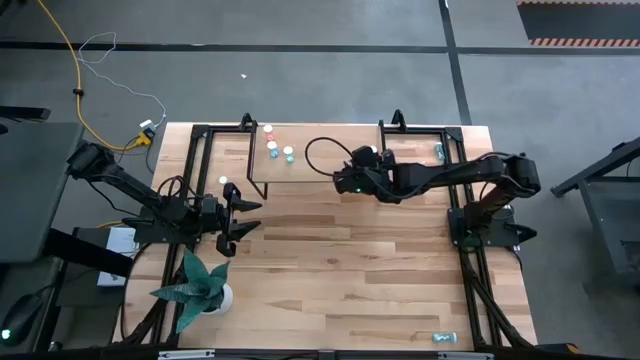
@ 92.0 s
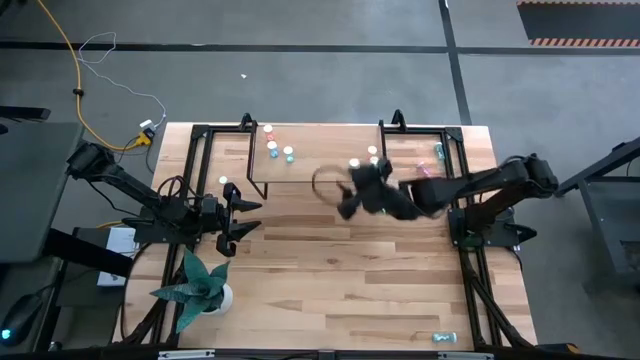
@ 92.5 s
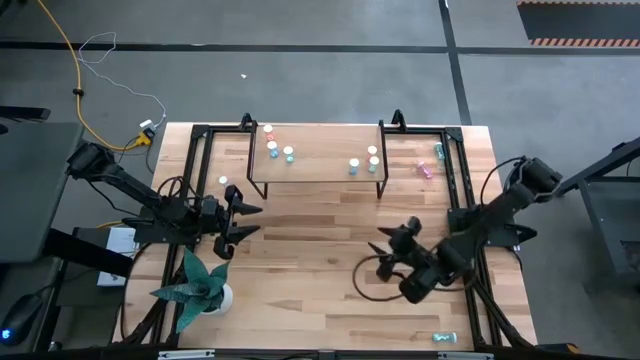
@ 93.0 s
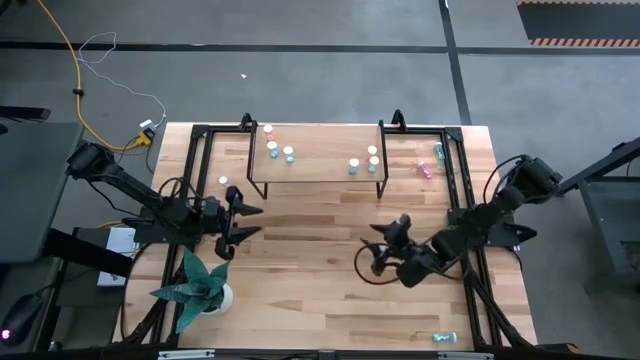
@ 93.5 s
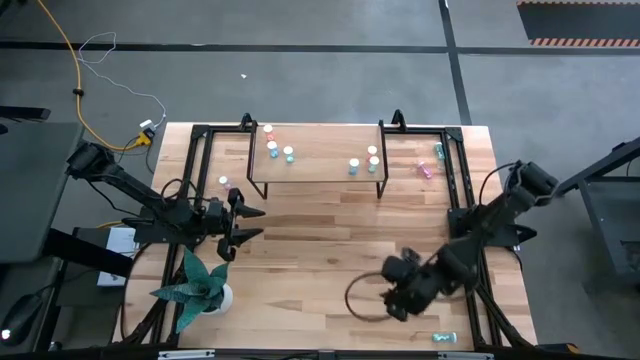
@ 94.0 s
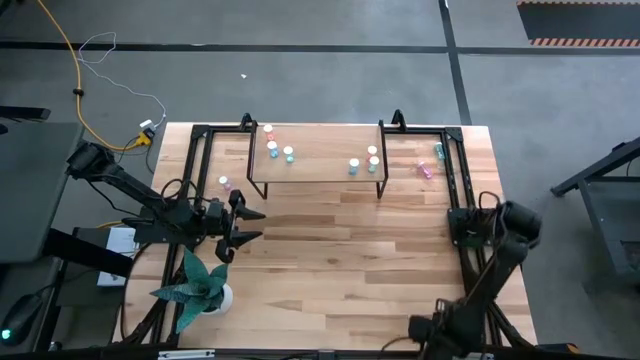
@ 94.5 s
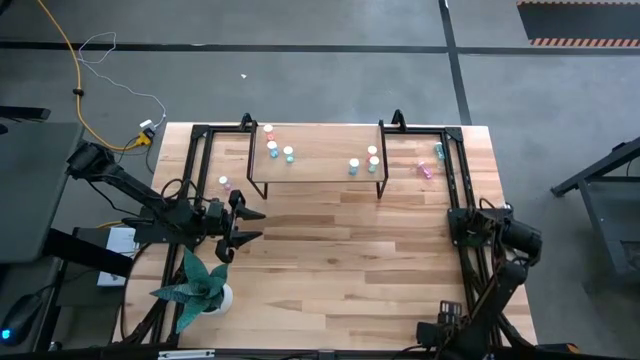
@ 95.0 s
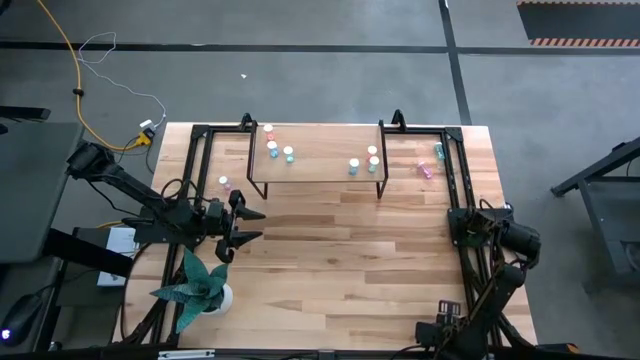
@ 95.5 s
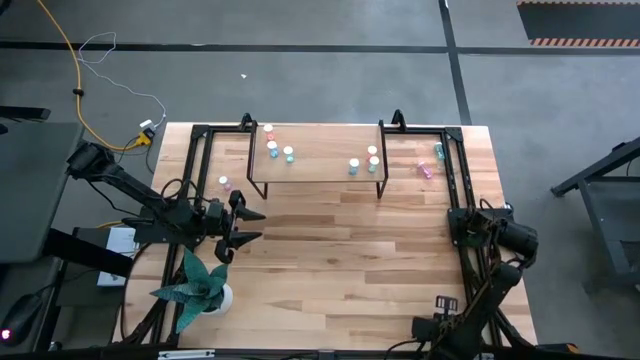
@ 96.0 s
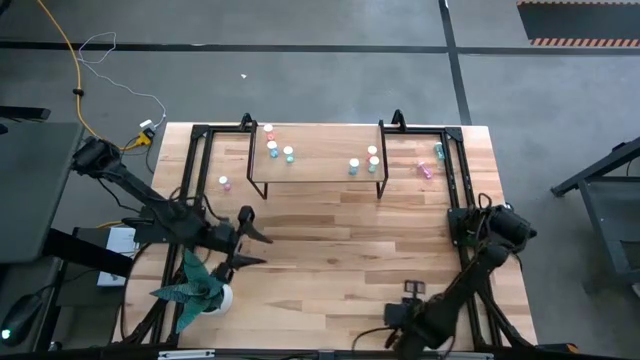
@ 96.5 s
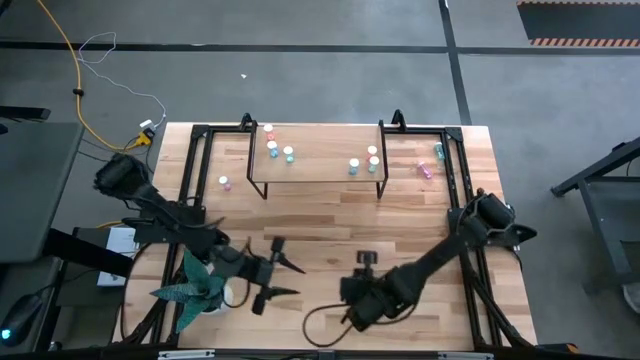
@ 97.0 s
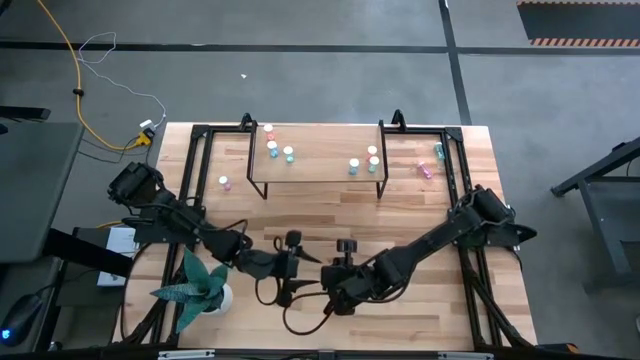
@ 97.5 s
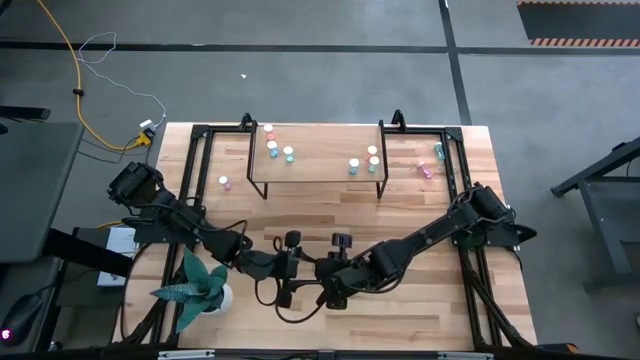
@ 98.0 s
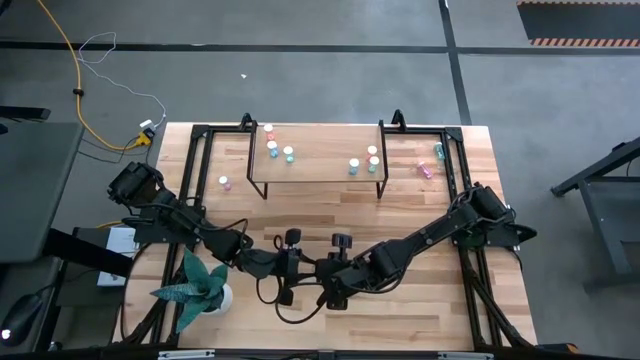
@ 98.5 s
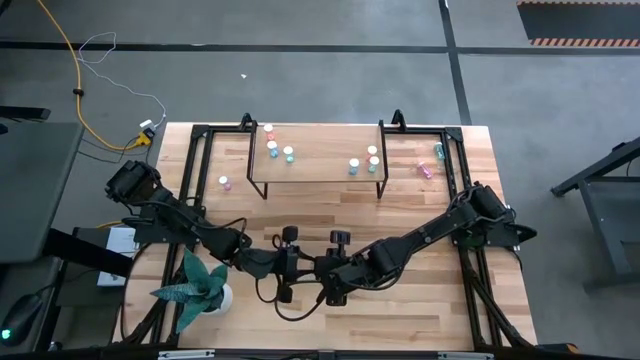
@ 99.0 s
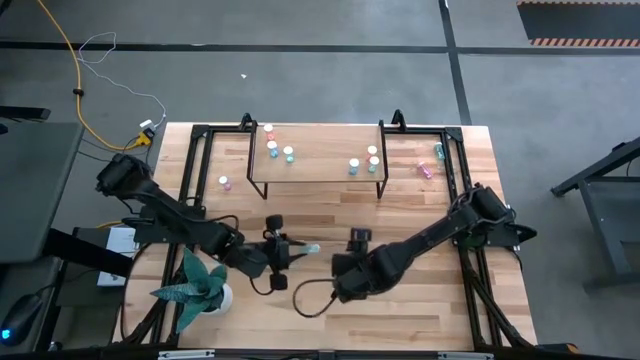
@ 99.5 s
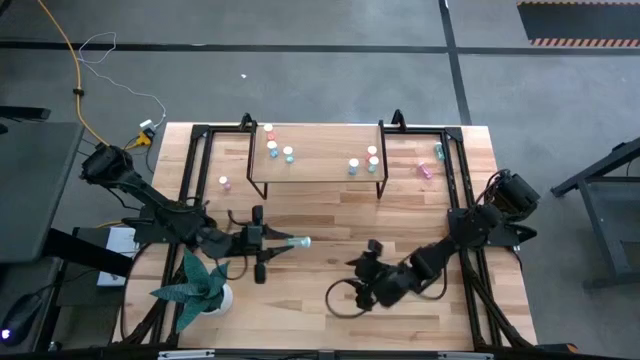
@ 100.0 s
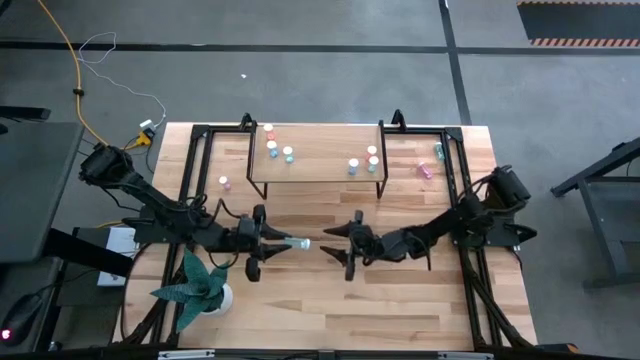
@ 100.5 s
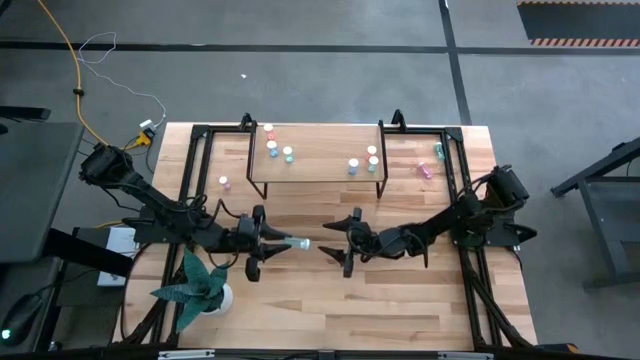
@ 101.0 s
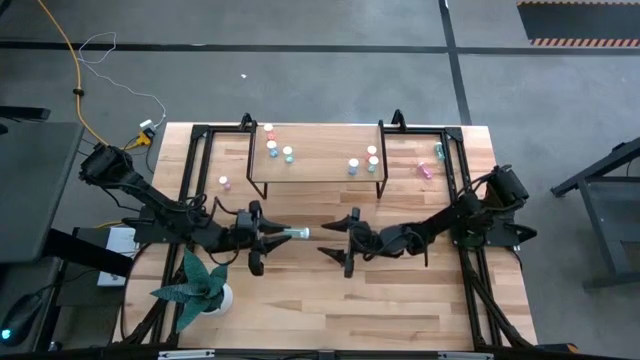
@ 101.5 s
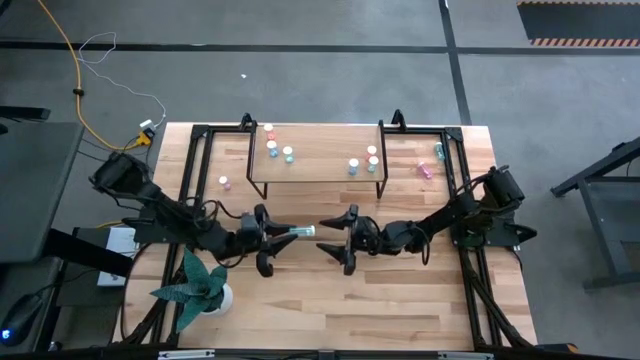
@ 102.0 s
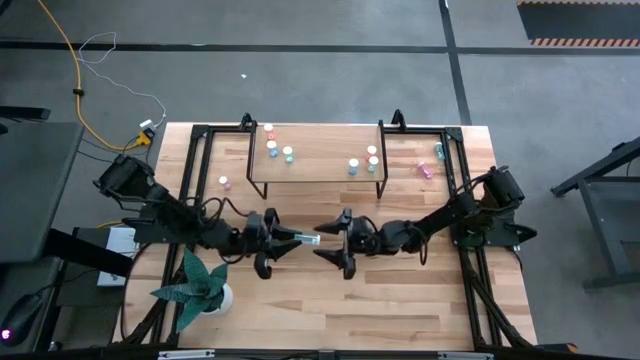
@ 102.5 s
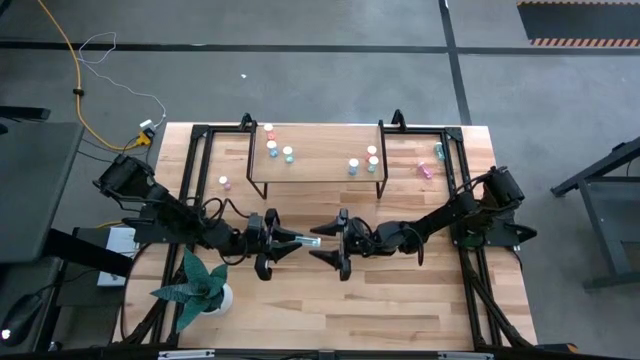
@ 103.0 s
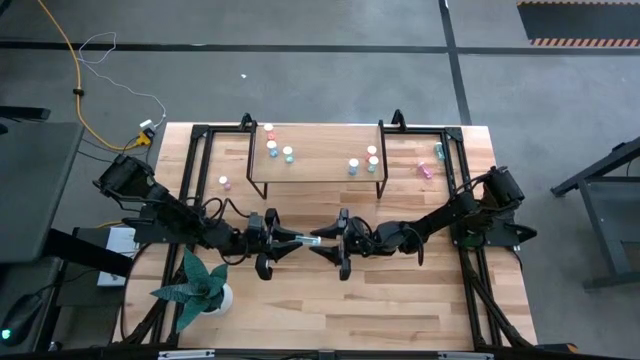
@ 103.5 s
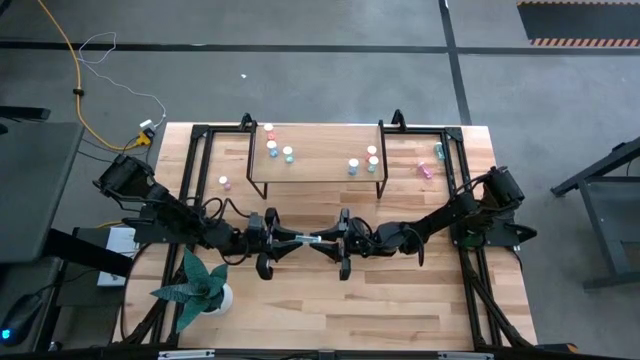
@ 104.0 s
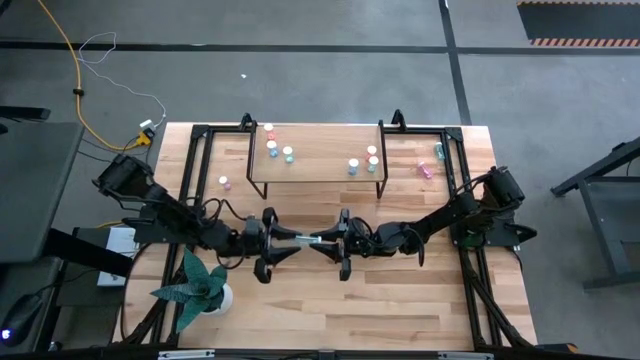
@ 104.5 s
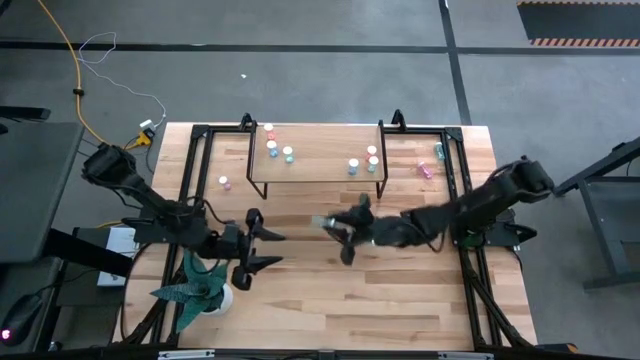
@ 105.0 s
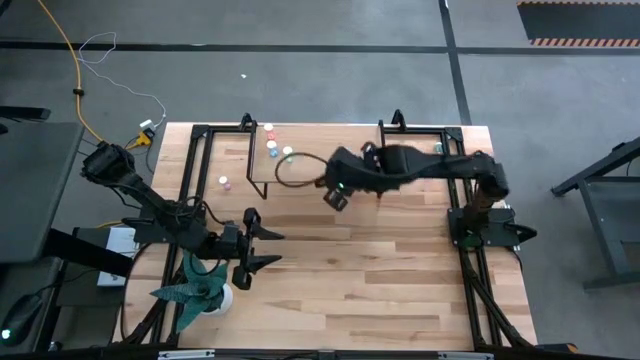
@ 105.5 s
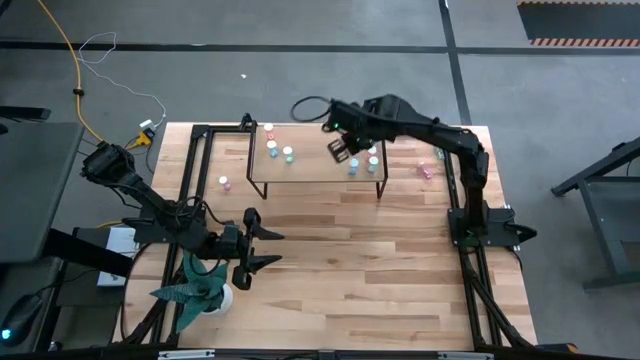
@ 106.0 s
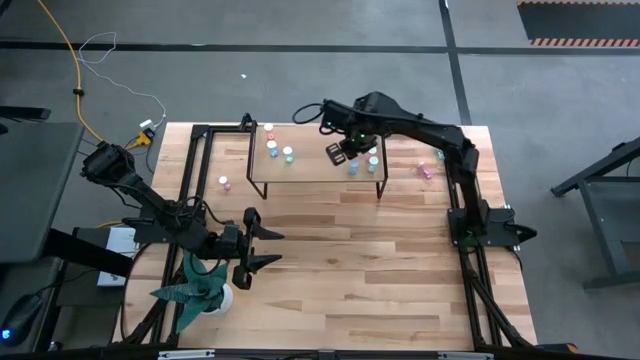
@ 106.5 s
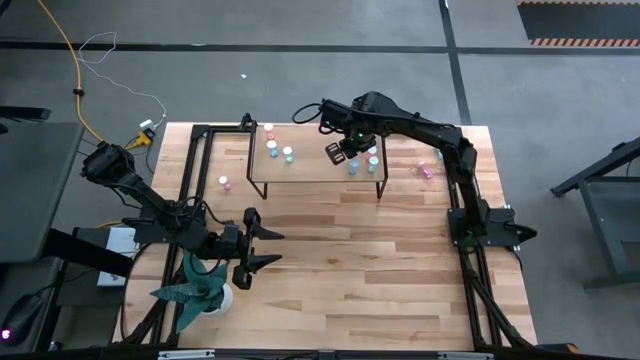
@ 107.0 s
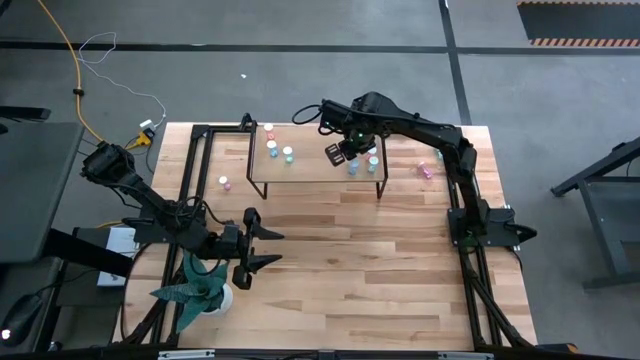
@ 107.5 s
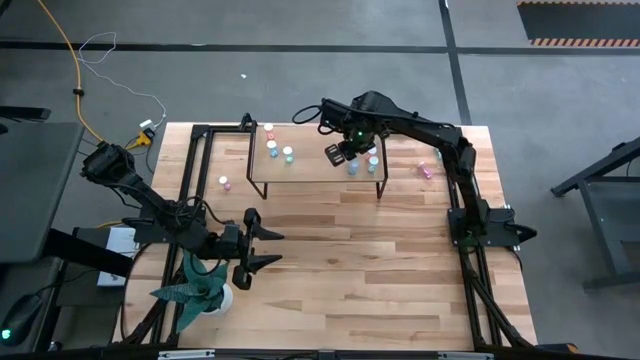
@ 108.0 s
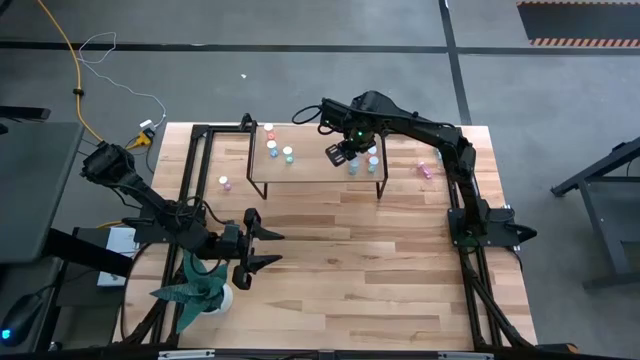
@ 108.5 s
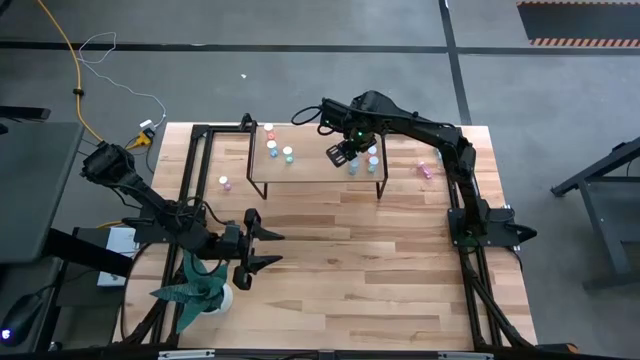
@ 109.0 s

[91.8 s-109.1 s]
Task: Pick and place medicine bottles onto shelf by color
Put the green pill bottle on the shelf

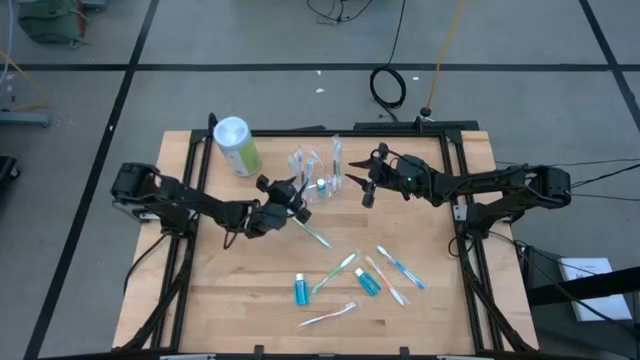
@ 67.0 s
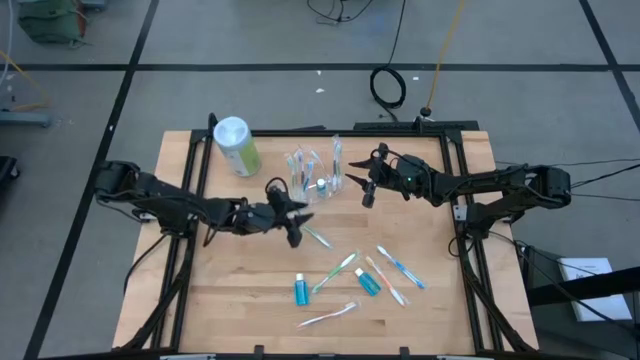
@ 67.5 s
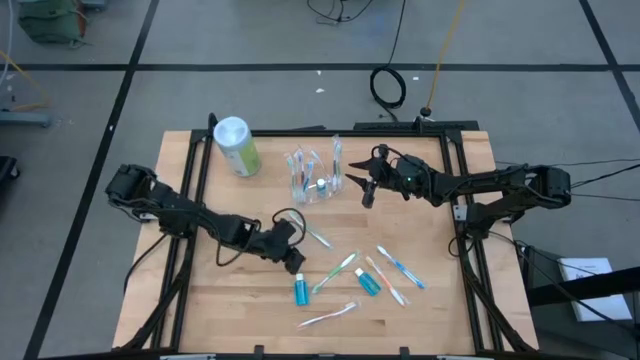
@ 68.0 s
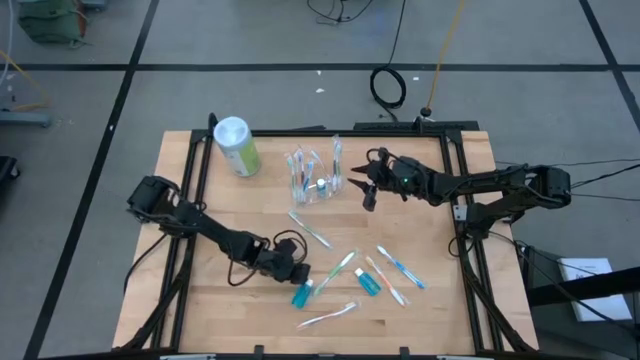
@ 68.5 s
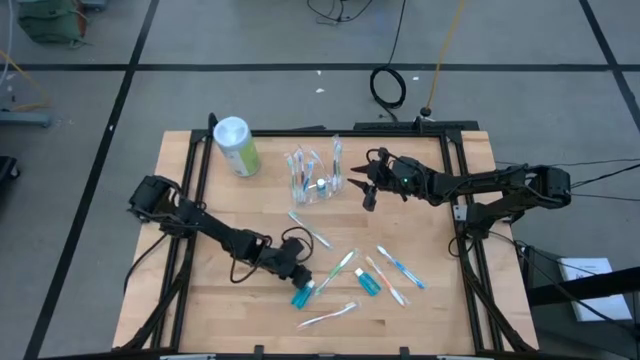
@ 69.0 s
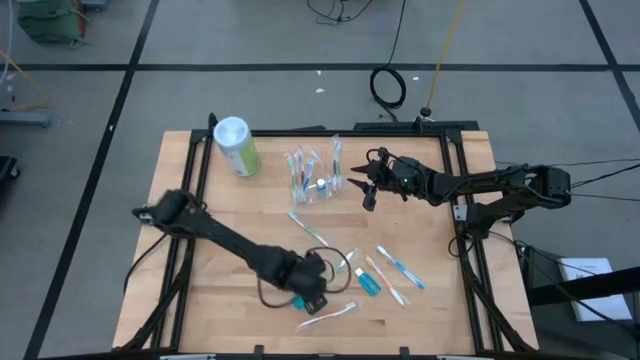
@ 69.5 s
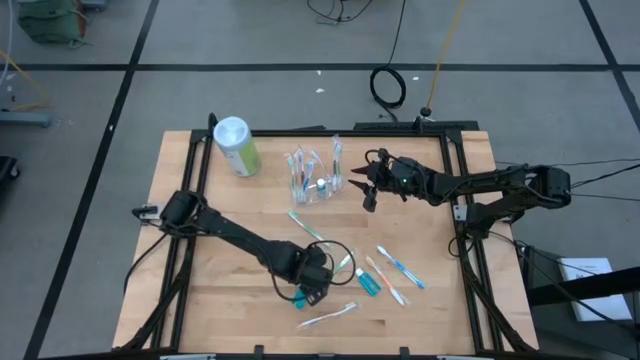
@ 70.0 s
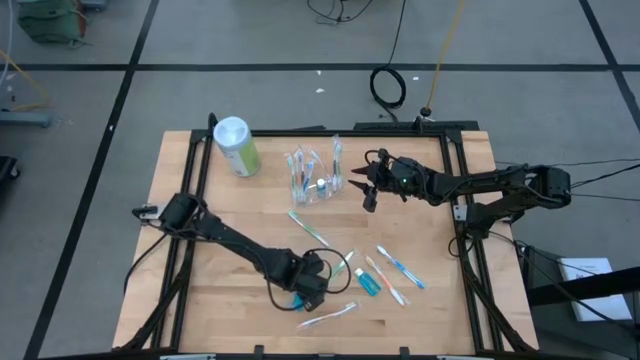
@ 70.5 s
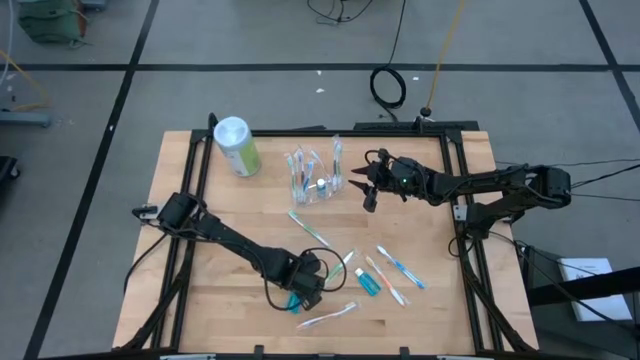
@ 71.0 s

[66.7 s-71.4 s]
Task: Pick & Place toothbrushing station
Put the blue mouthwash into the transparent organizer
